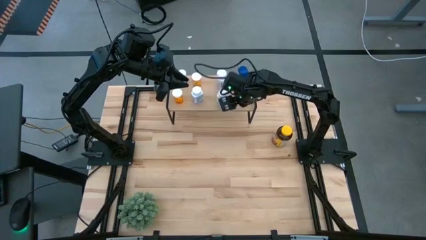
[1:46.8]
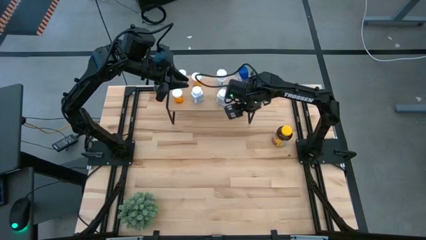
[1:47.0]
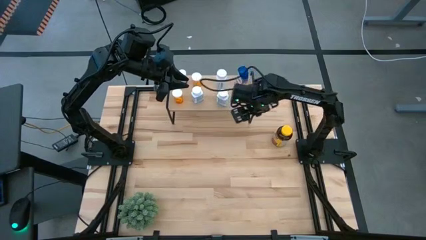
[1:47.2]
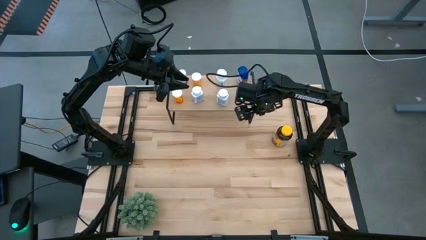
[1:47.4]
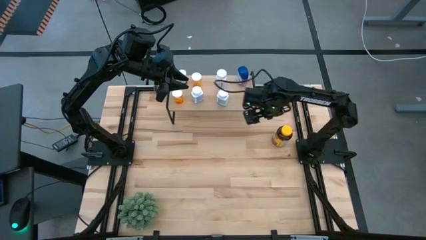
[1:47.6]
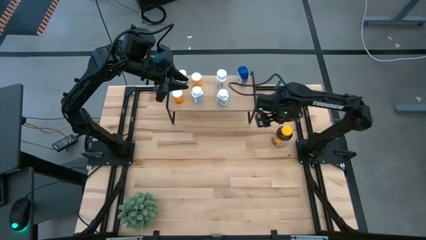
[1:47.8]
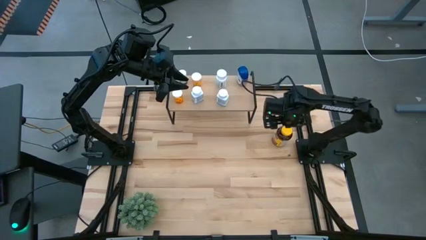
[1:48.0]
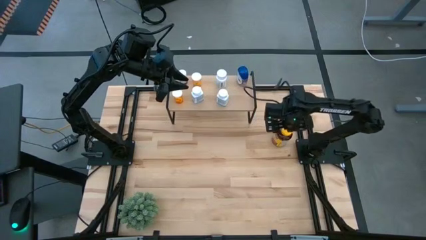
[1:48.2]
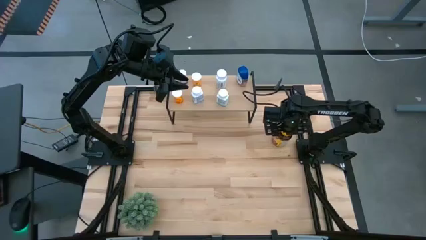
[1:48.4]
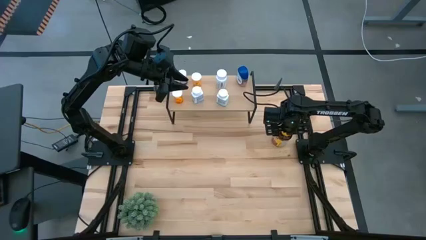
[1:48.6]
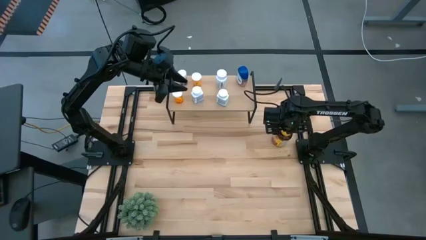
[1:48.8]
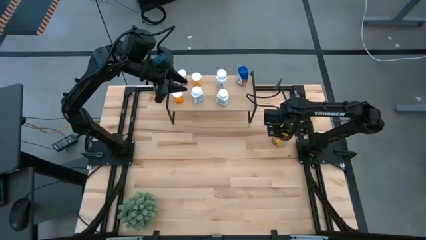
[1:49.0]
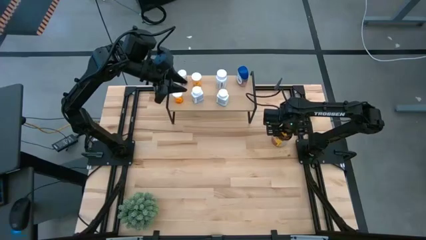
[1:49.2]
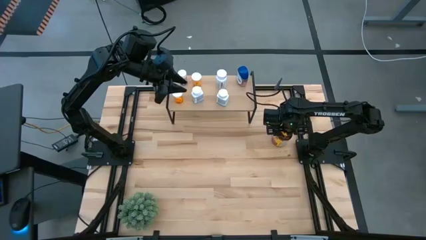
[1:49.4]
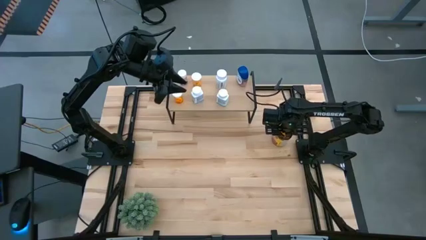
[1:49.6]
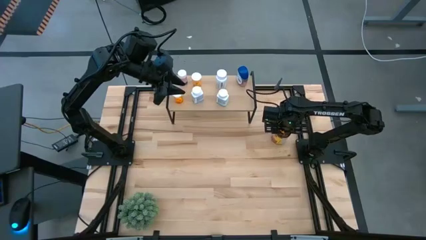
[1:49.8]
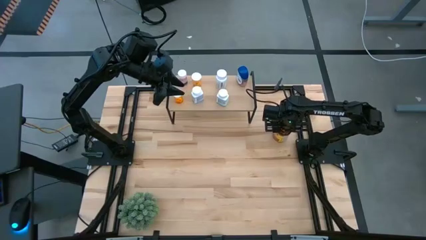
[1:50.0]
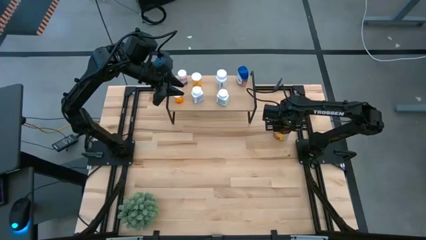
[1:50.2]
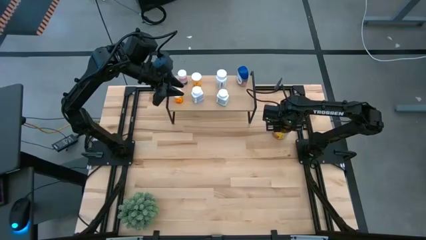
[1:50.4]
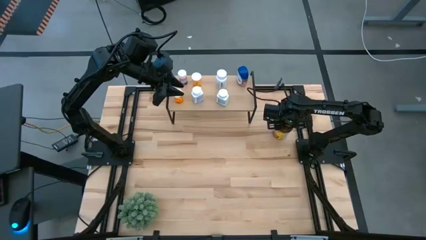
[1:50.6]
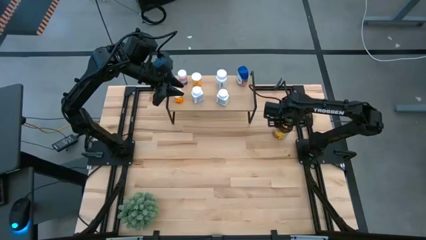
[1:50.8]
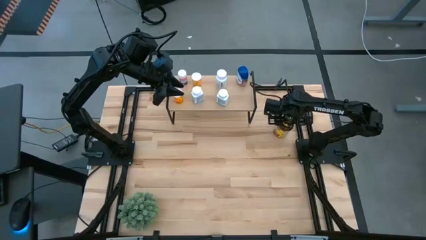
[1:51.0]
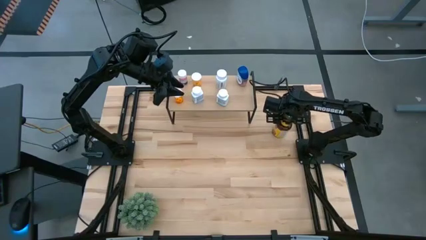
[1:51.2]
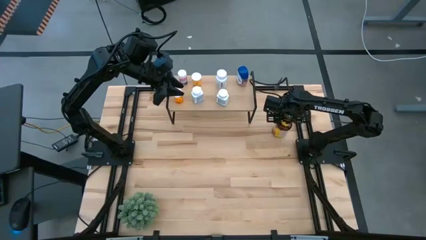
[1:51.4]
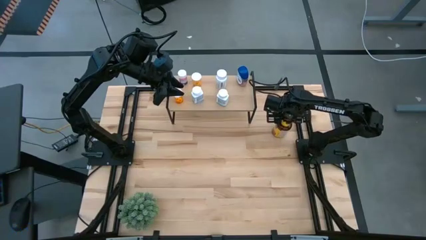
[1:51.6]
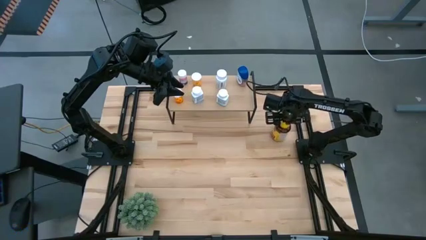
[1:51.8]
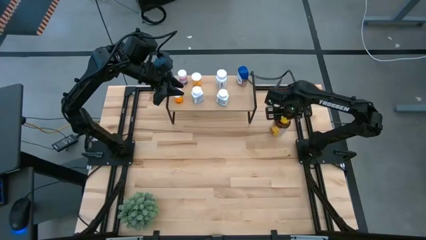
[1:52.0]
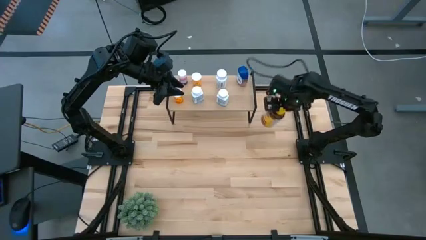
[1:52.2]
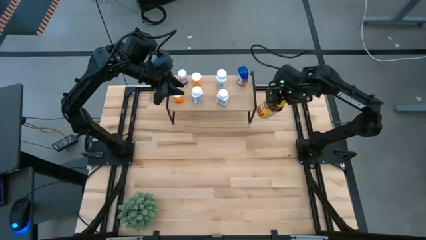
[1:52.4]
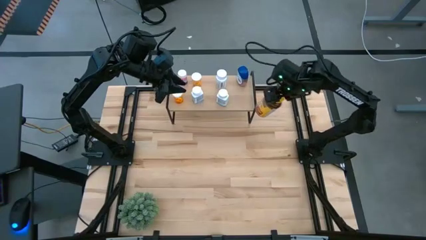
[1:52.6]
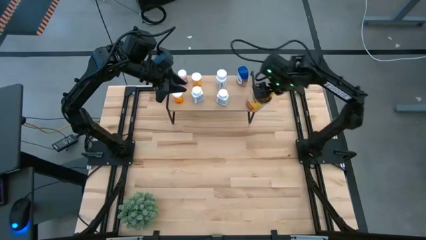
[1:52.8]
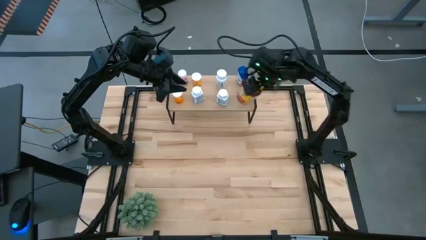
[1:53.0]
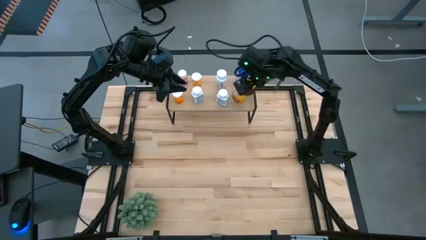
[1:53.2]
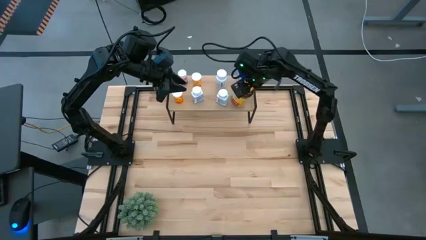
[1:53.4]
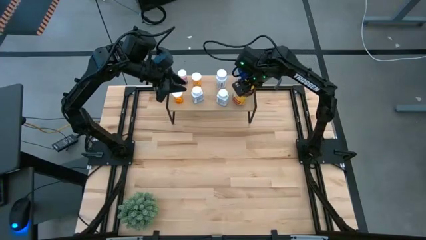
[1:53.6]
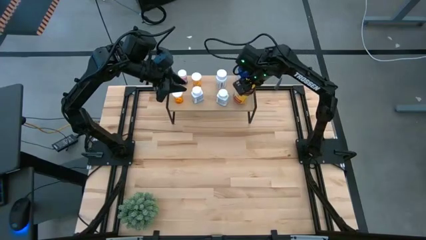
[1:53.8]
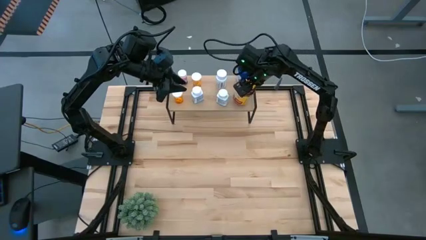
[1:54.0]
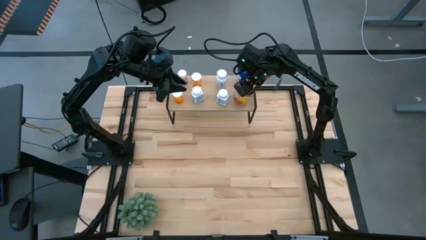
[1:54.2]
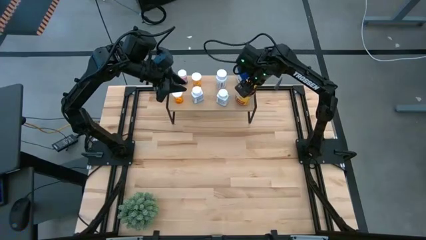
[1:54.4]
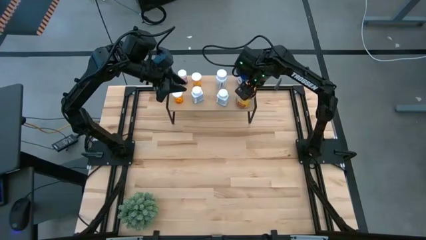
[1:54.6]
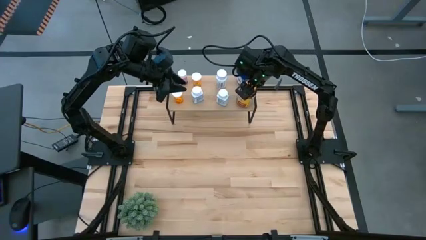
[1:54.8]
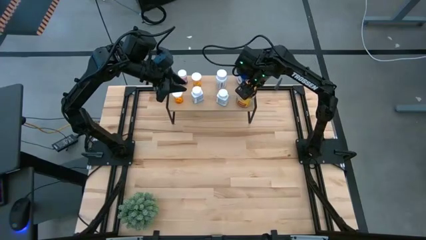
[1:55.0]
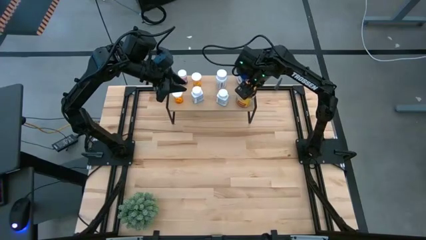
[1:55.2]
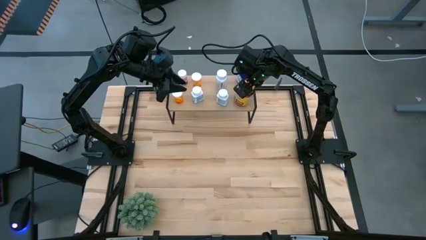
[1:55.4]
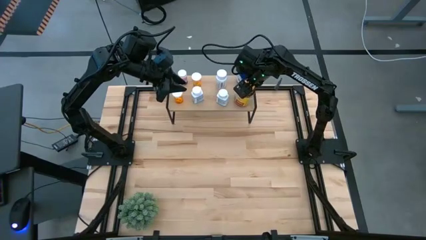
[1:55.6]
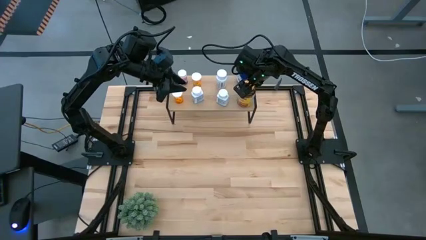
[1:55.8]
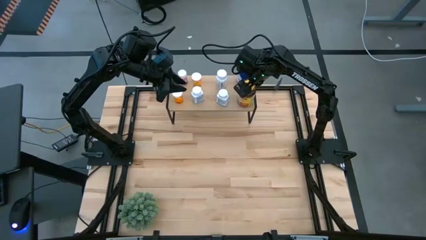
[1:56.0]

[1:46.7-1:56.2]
Task: Pick and place medicine bottles onto shelf by color
Put the yellow medicine bottle on the shelf

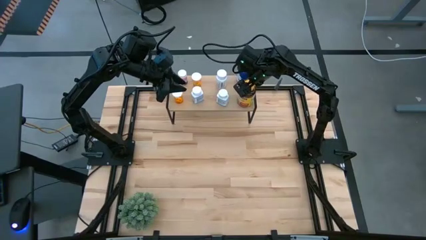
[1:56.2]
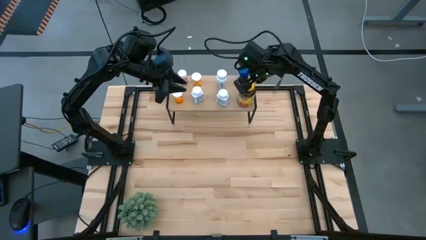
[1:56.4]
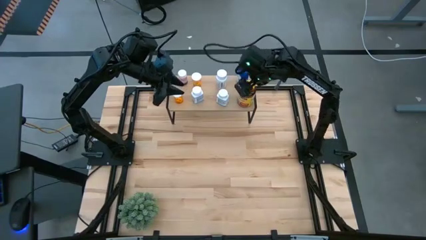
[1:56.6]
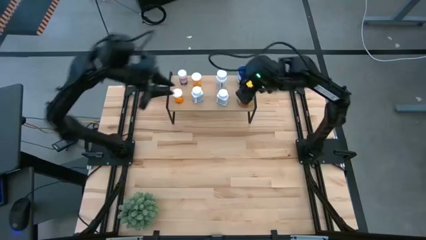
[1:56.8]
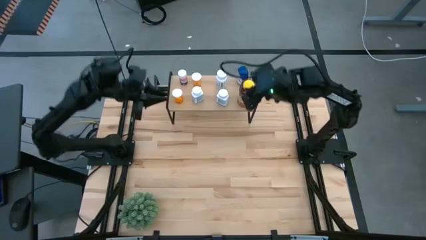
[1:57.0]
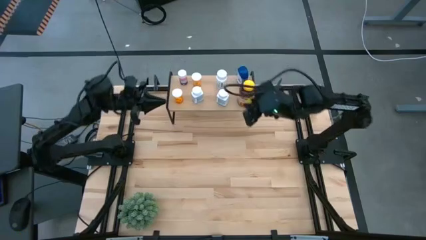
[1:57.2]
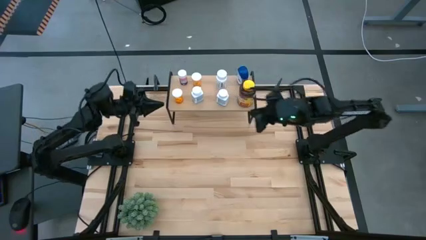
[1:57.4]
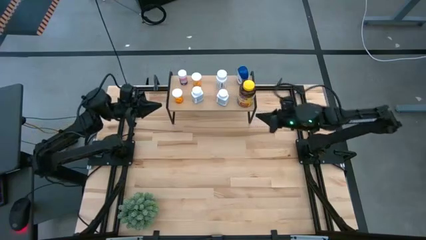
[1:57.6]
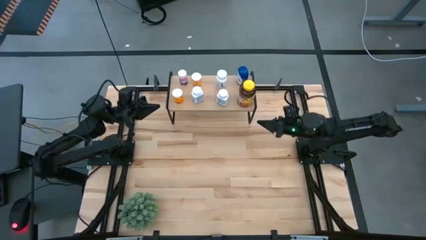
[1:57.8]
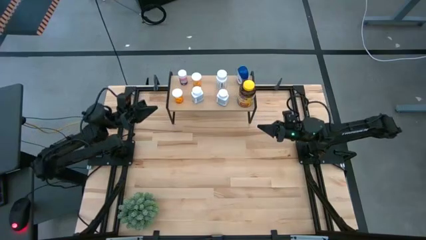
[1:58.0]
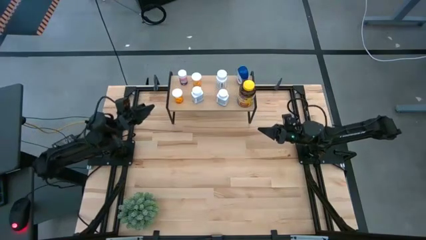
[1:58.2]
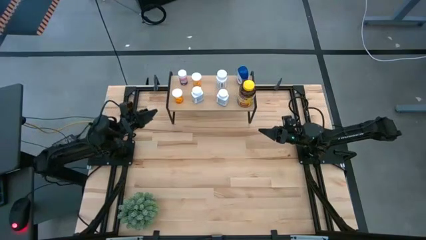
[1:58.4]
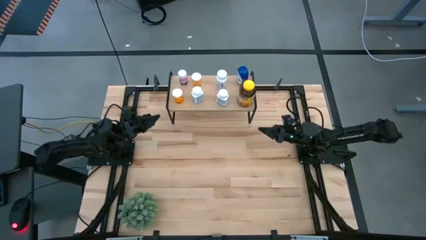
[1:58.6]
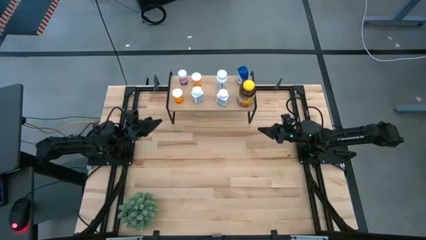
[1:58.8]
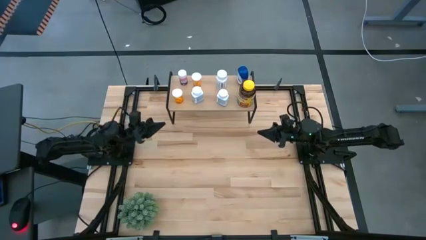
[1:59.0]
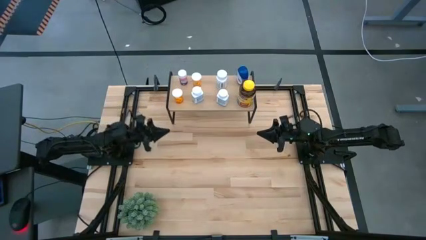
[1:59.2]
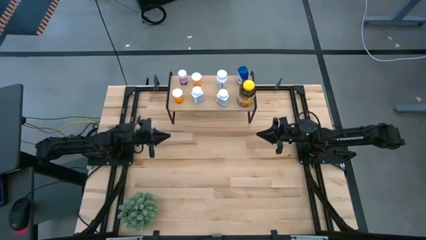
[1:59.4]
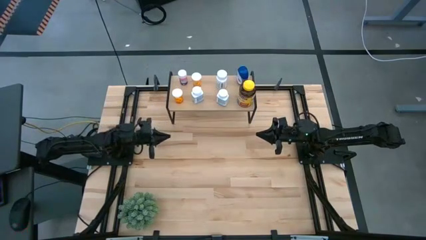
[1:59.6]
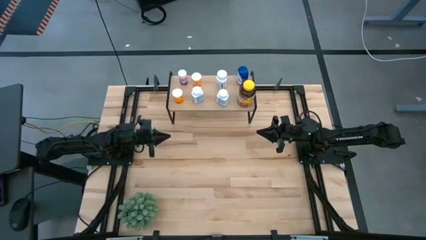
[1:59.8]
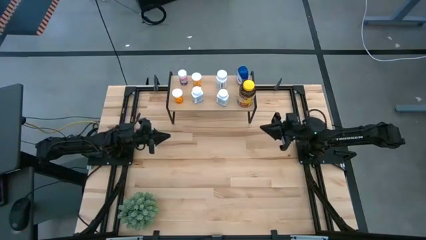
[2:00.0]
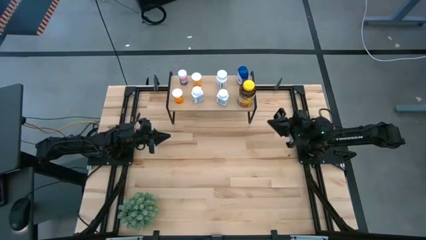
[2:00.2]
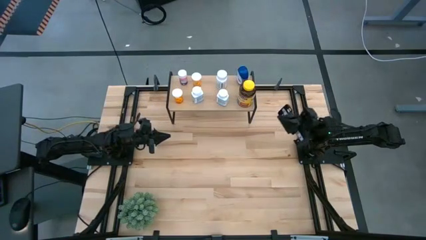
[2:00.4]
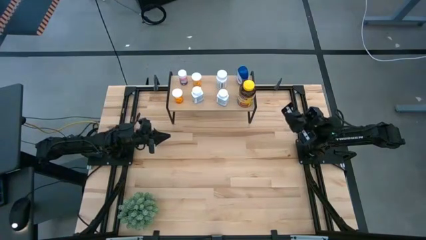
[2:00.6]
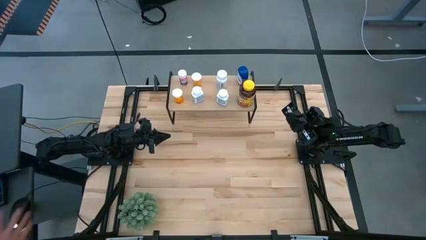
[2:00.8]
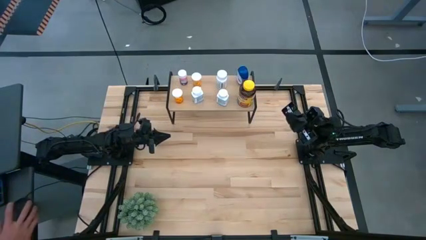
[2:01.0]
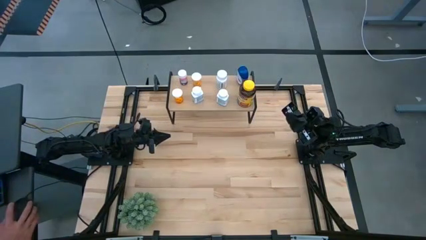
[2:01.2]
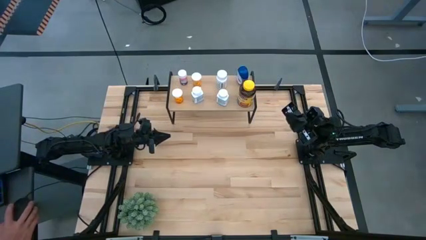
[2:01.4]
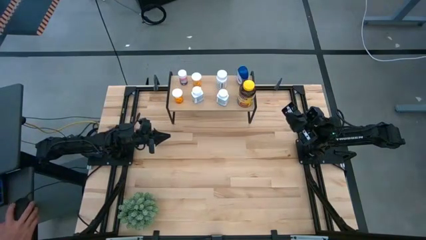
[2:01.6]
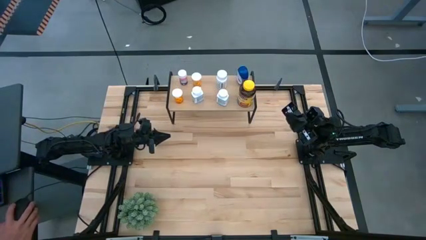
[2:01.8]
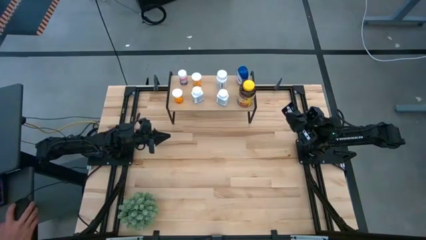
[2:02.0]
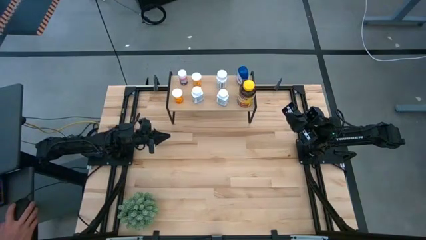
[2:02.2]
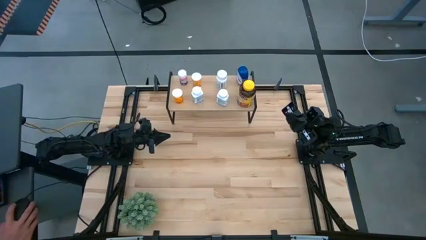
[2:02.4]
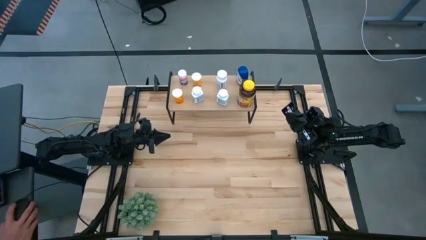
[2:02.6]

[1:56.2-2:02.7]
Return to Home Position
